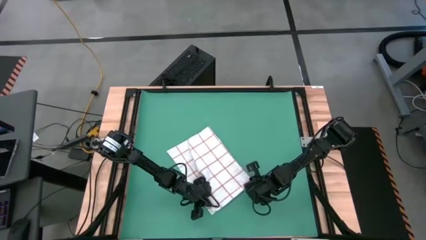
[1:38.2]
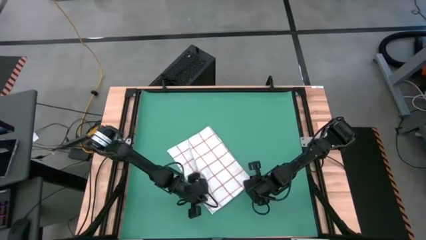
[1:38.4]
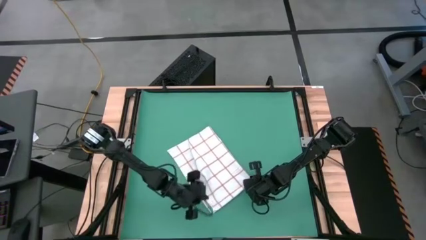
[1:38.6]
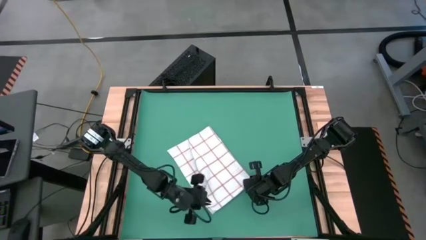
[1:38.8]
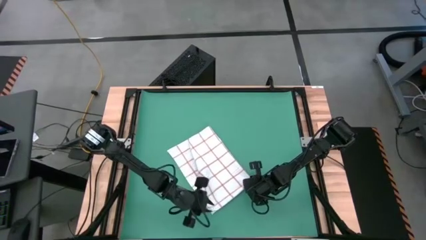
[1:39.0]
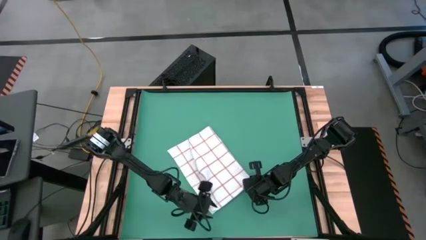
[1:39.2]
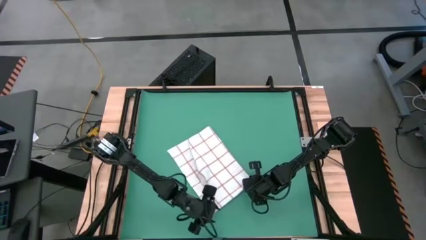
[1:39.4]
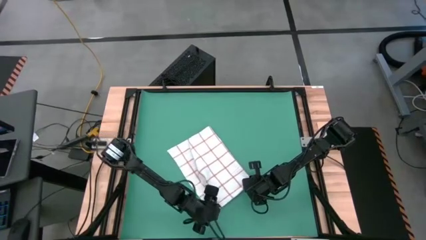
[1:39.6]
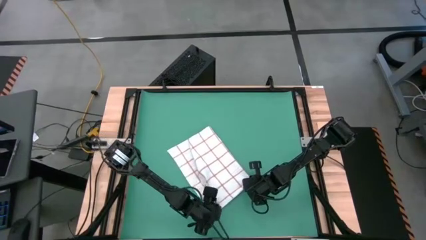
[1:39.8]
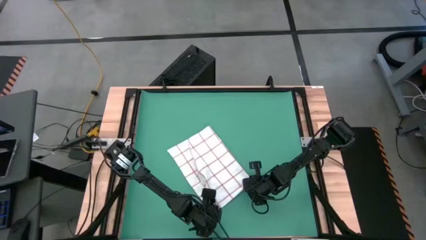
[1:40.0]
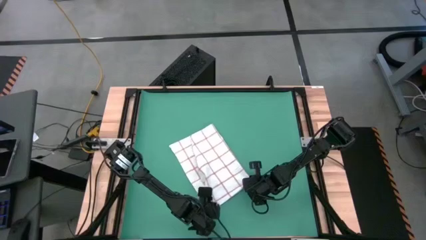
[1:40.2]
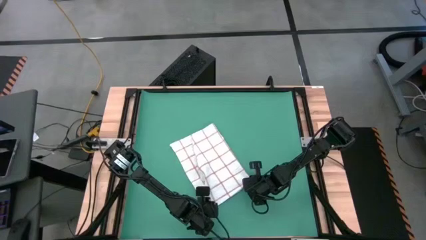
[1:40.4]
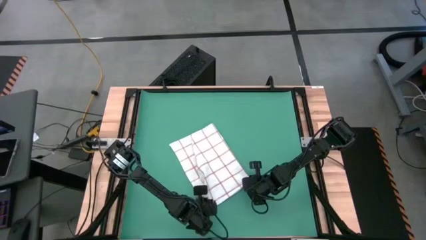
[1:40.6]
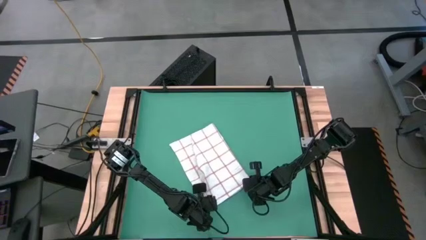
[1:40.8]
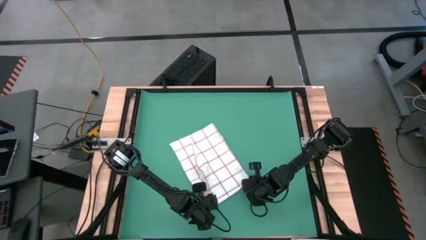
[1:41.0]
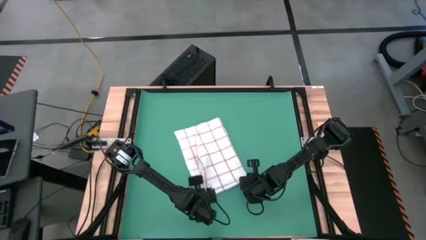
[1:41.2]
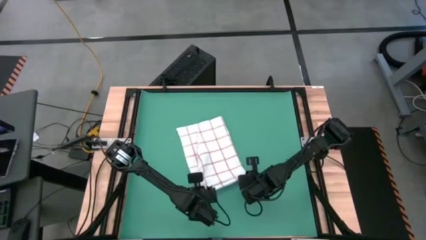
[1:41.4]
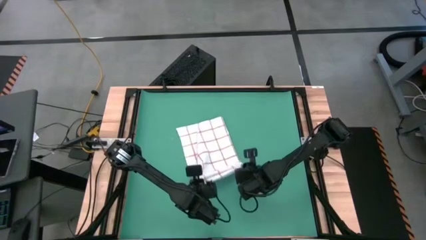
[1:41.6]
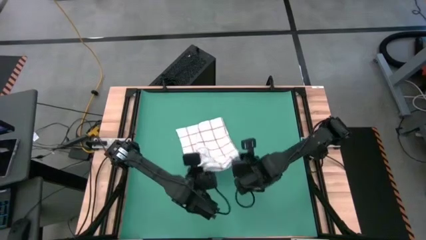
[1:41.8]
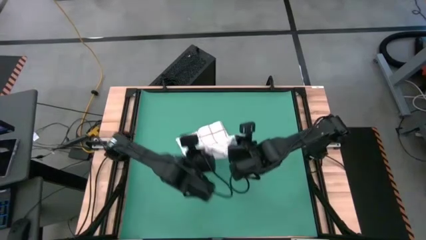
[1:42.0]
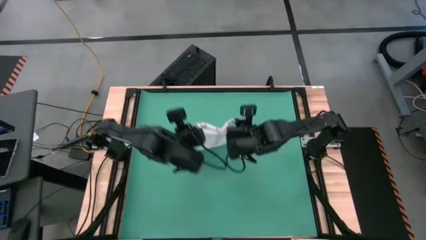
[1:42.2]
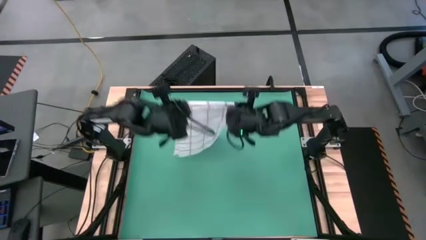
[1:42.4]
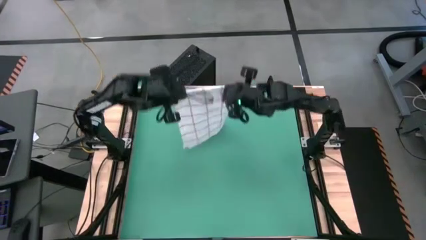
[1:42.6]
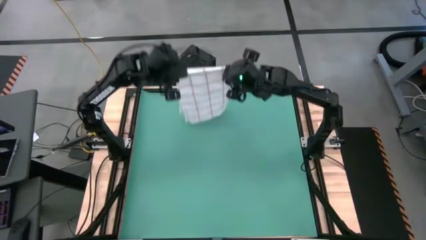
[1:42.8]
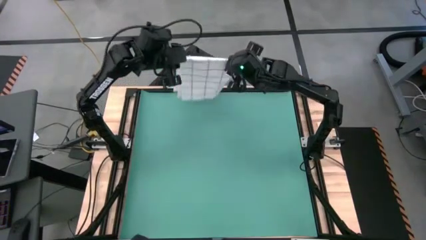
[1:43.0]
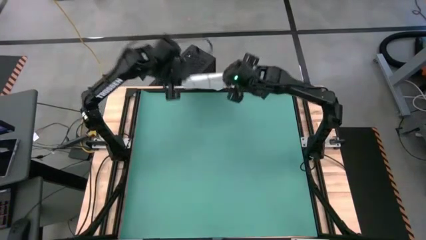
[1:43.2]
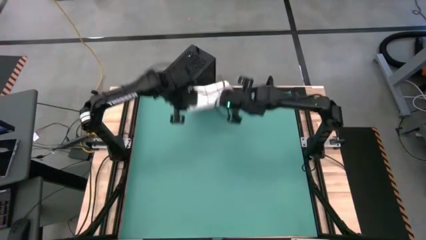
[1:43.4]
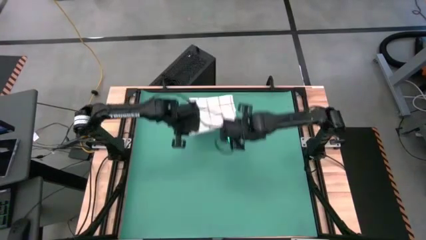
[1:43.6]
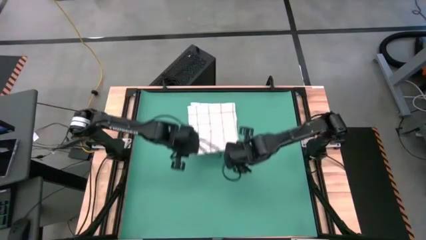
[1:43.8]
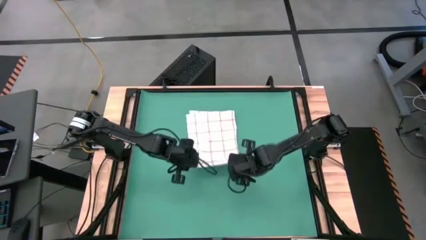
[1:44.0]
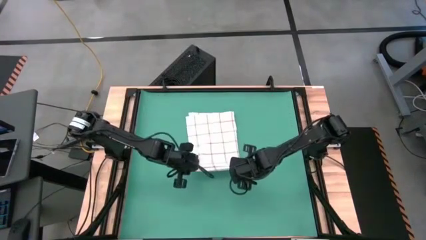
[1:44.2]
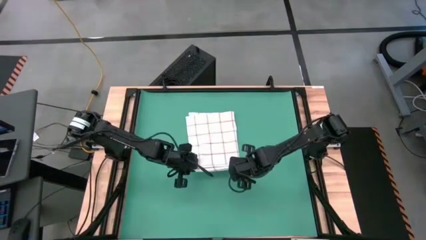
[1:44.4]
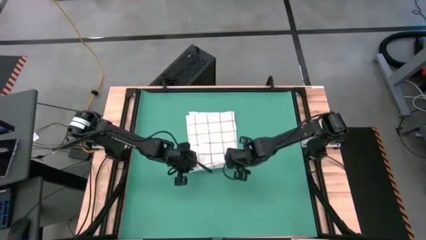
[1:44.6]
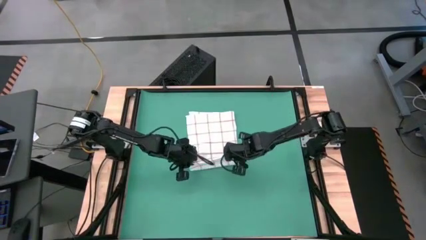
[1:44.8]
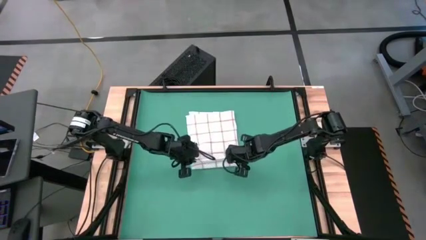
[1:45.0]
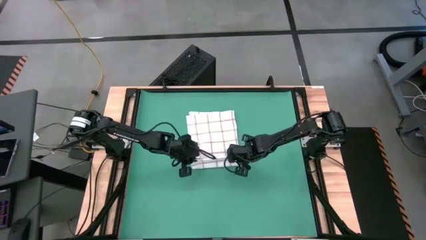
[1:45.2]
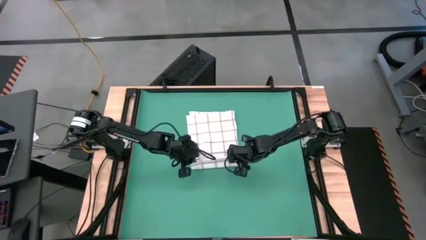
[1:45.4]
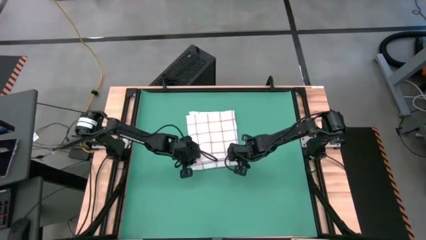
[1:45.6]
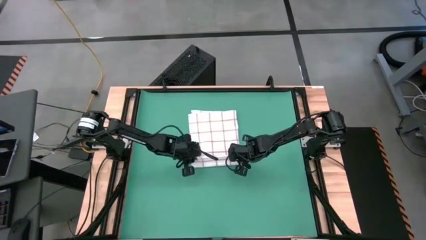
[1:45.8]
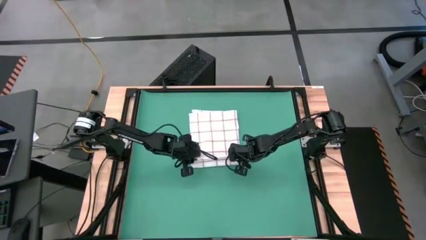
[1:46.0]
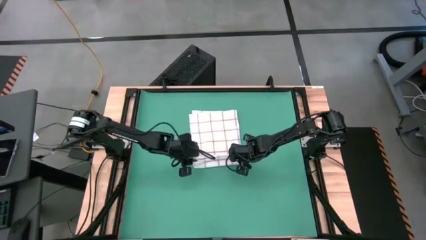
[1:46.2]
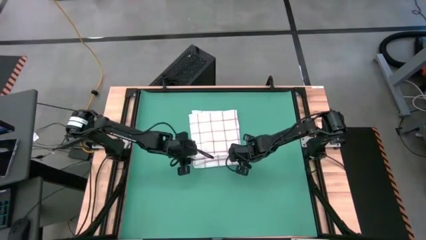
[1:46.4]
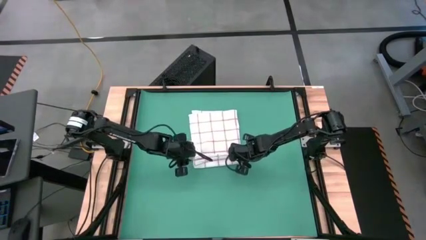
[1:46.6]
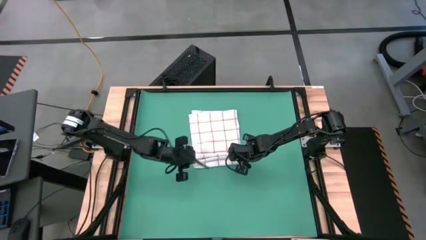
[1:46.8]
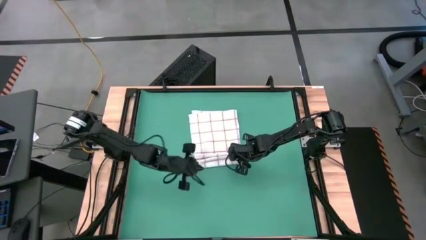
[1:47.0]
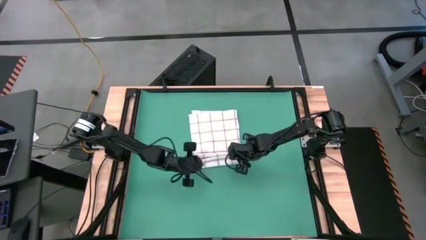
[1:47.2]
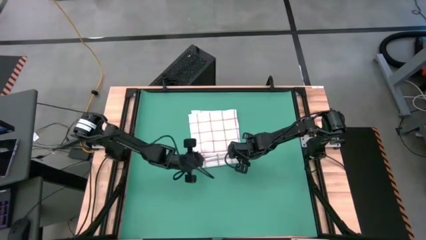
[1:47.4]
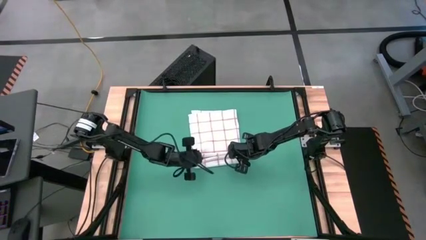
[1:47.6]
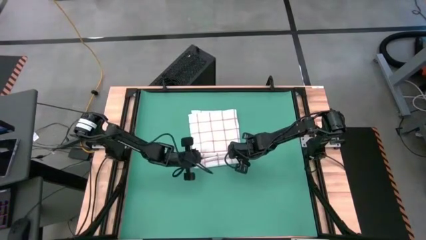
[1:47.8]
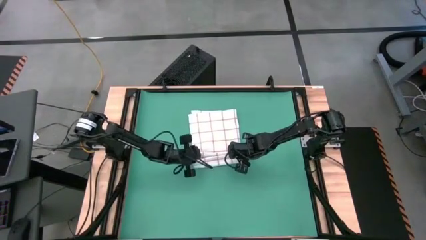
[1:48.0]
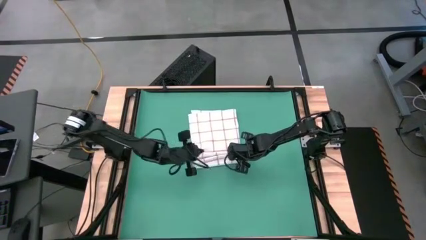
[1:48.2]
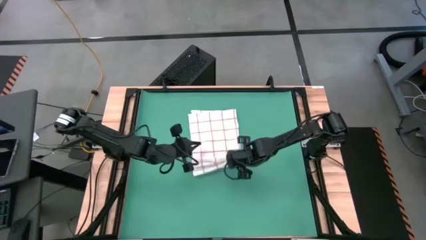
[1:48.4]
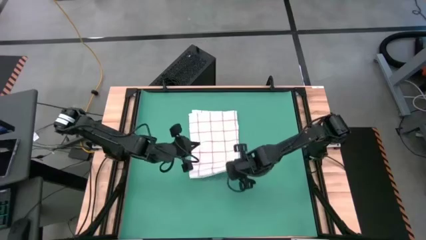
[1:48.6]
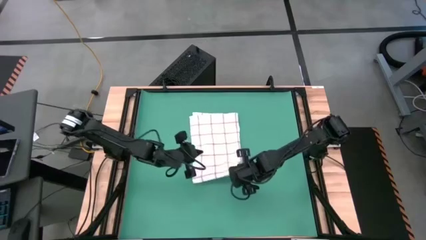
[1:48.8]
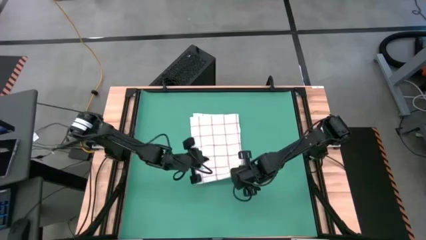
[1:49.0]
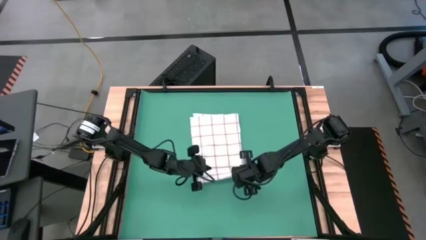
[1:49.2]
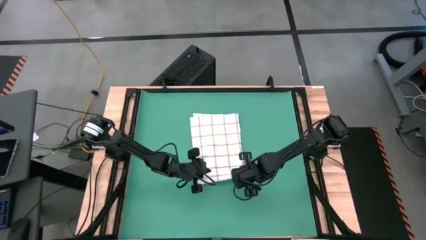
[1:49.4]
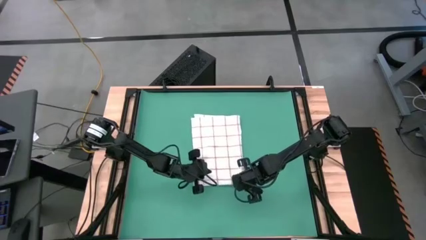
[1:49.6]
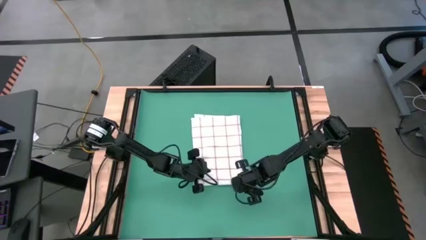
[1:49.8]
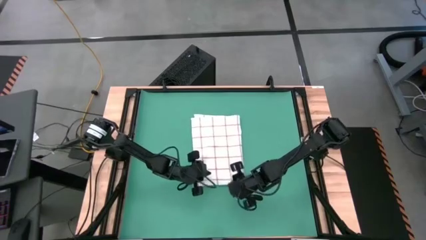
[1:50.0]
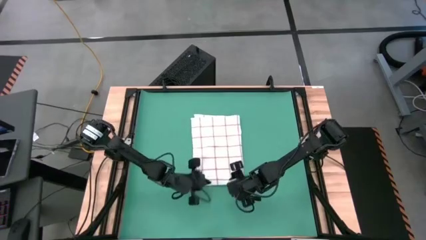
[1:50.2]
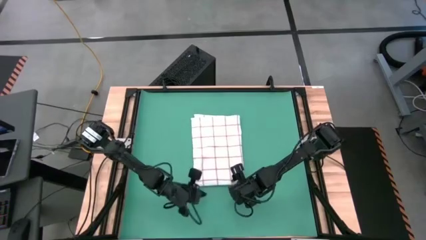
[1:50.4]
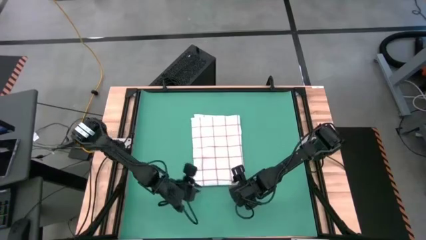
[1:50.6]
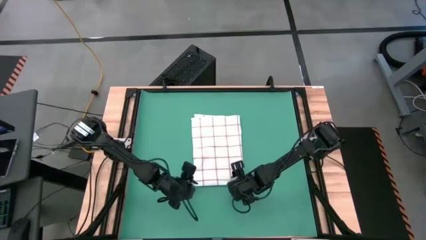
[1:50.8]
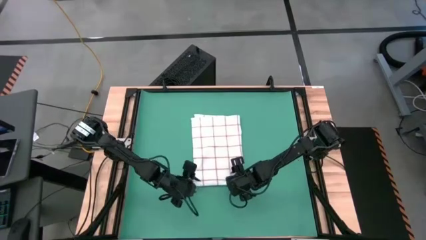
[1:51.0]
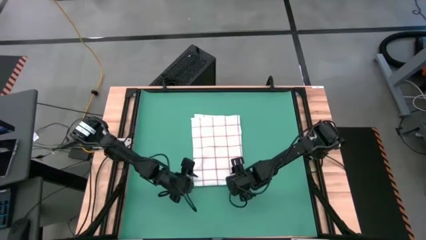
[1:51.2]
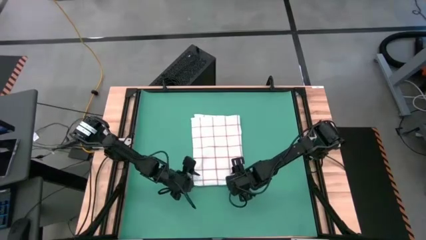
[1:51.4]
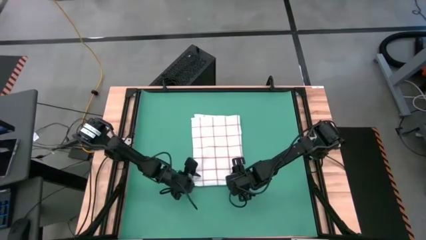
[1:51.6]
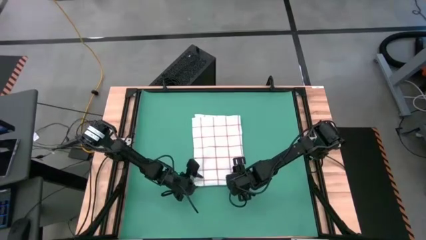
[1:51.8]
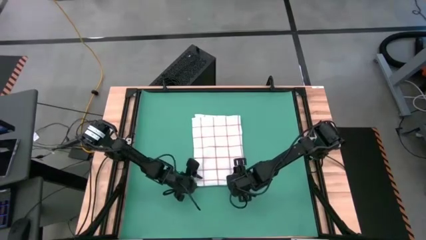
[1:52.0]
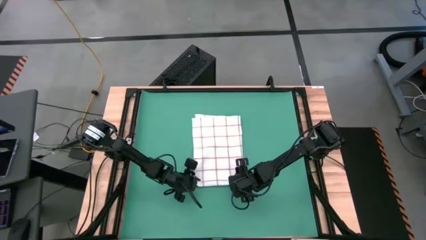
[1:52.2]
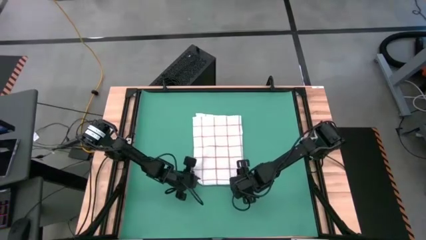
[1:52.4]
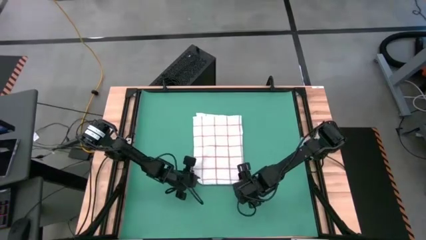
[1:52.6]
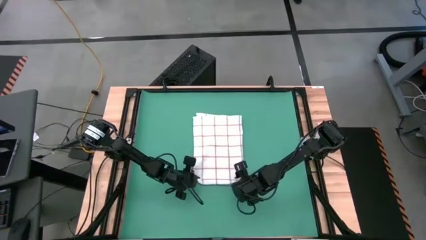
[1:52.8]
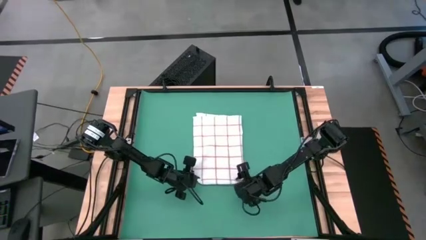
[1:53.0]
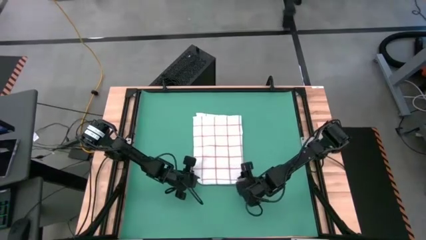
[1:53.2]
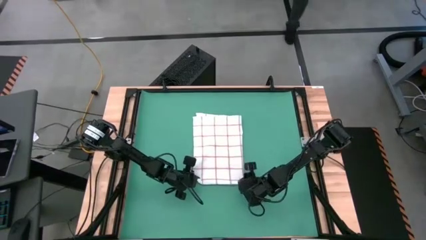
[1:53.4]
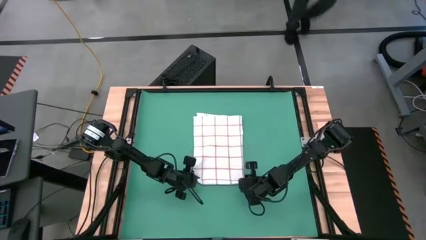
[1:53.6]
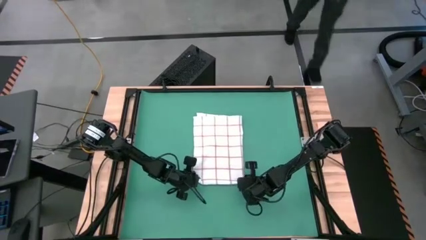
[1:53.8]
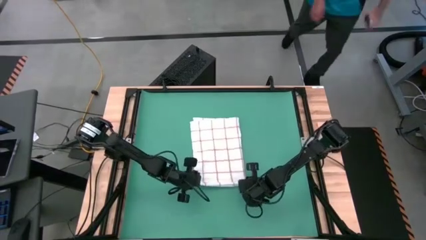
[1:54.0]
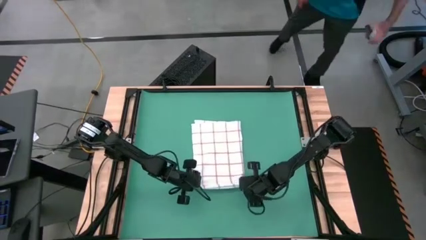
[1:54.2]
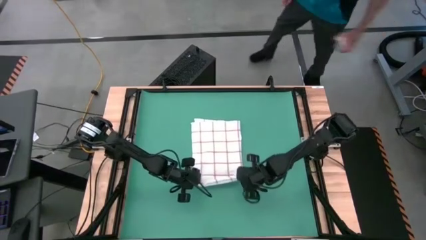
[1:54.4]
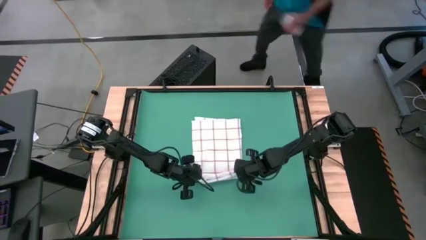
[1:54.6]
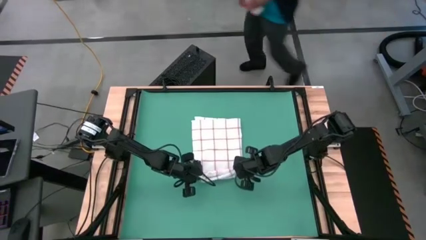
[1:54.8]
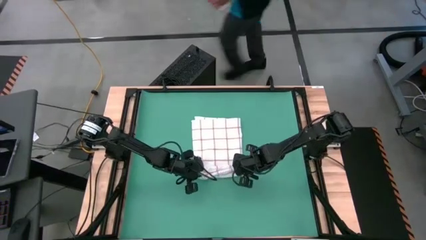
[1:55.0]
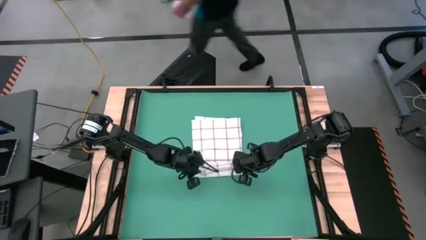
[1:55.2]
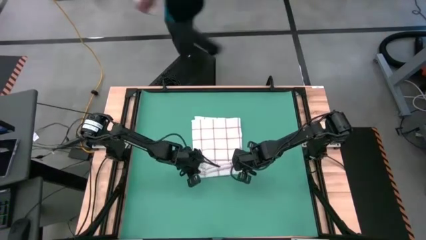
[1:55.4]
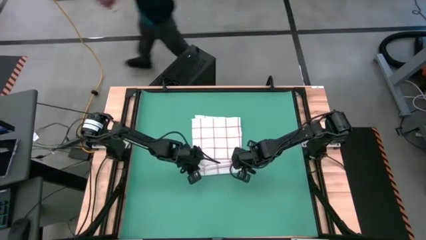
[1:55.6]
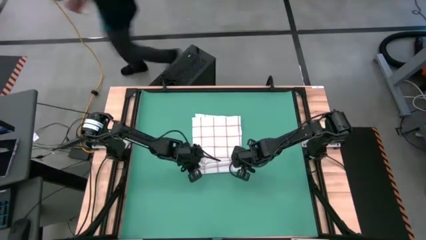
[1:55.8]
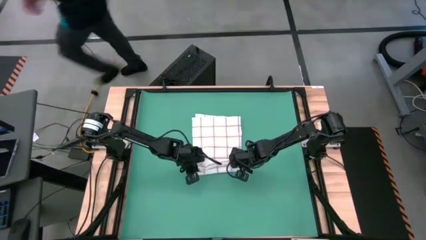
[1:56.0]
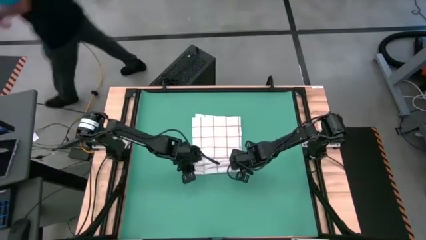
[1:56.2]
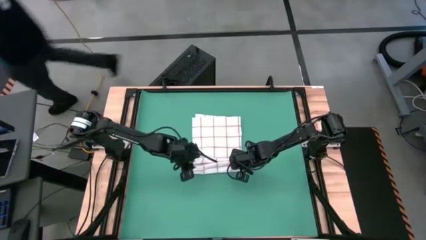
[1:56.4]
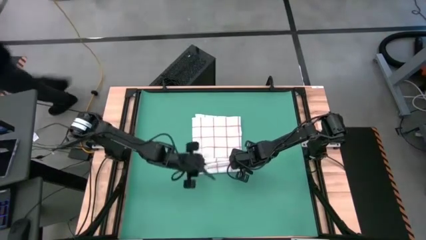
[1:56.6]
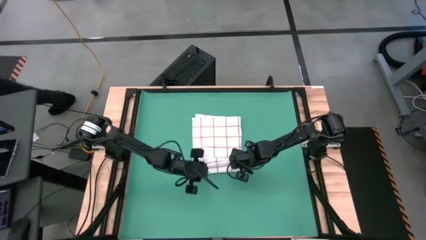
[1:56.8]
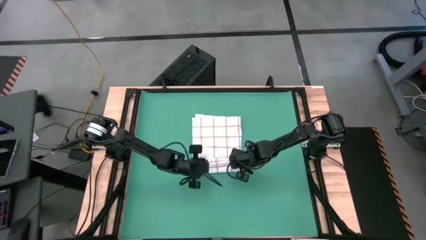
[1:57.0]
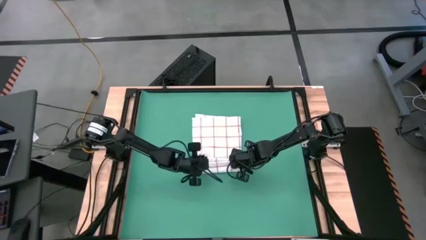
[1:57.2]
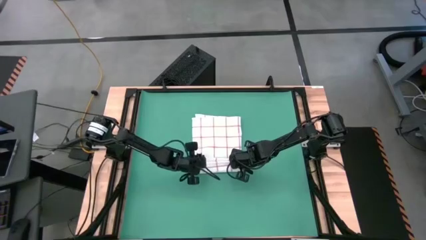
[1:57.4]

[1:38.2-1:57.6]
Task: Roll towel into tight, uniform cylinder
Roll the white towel
